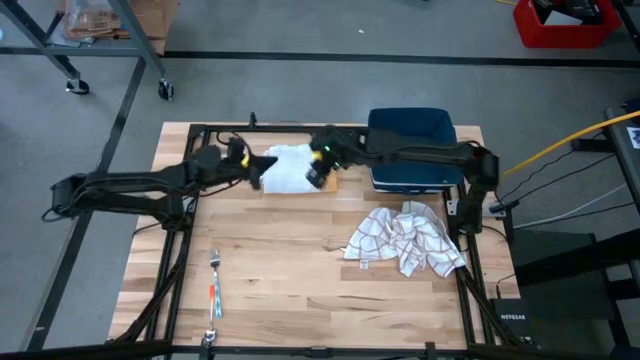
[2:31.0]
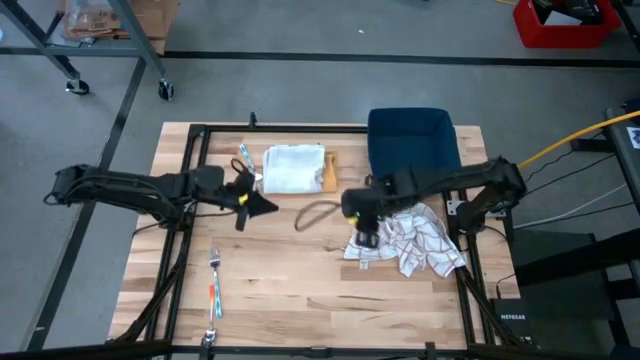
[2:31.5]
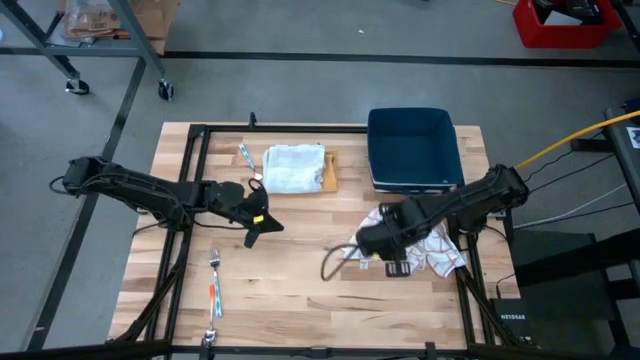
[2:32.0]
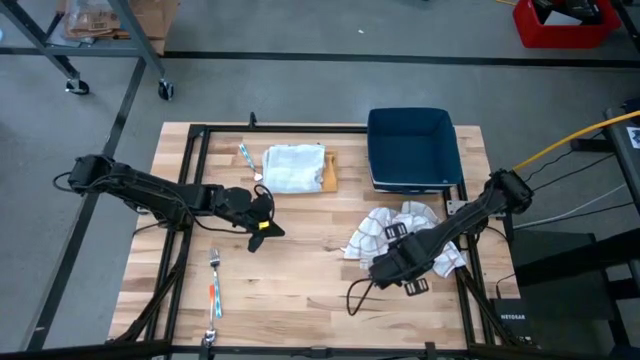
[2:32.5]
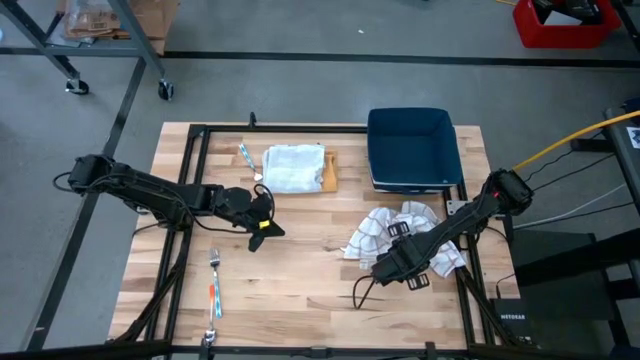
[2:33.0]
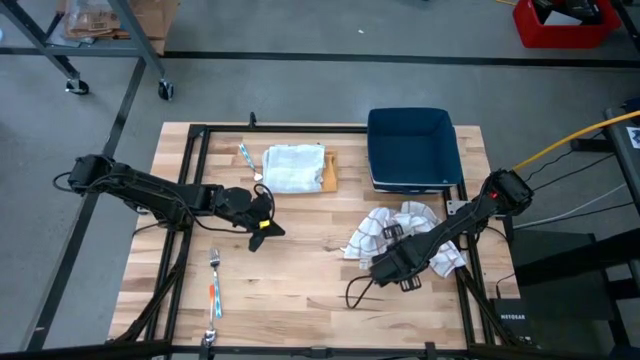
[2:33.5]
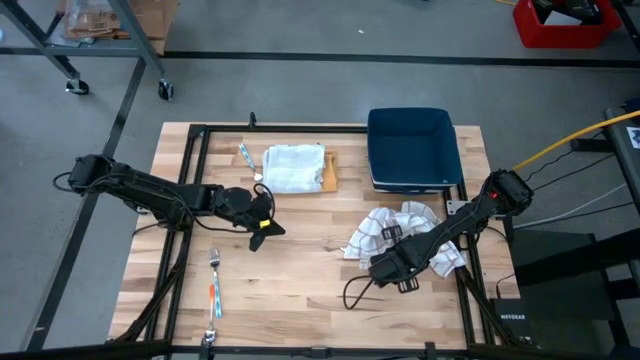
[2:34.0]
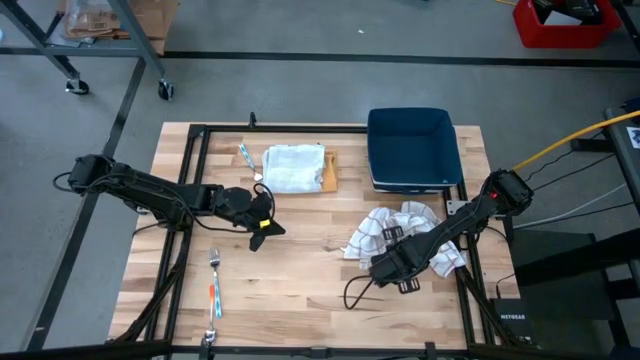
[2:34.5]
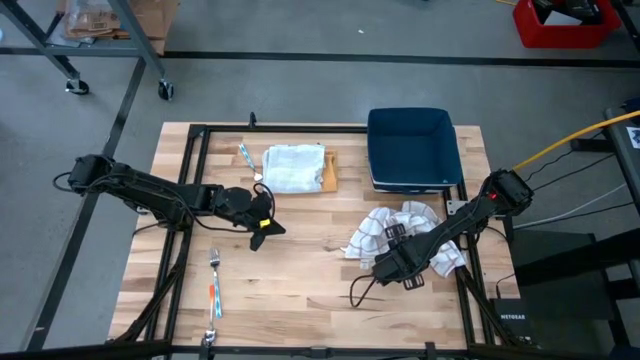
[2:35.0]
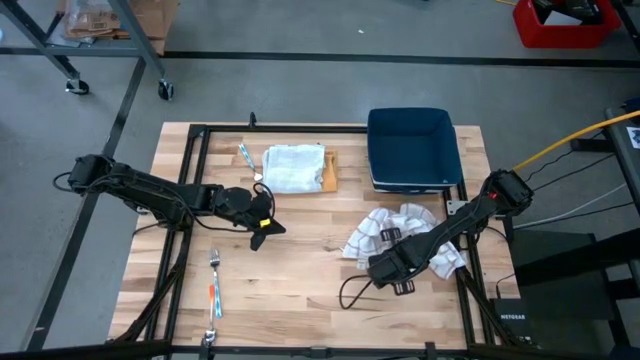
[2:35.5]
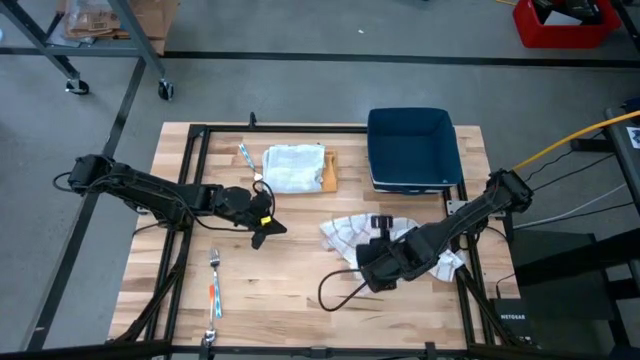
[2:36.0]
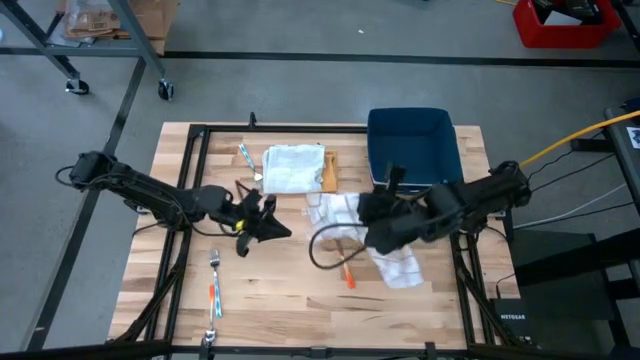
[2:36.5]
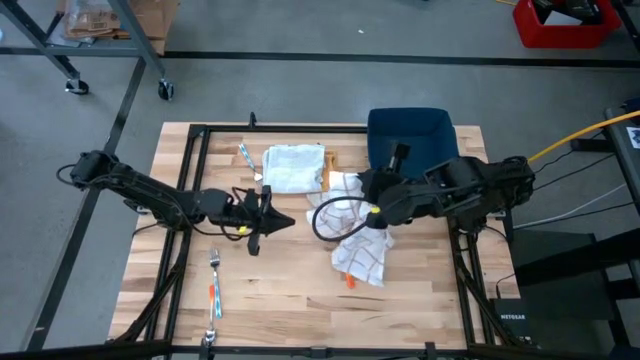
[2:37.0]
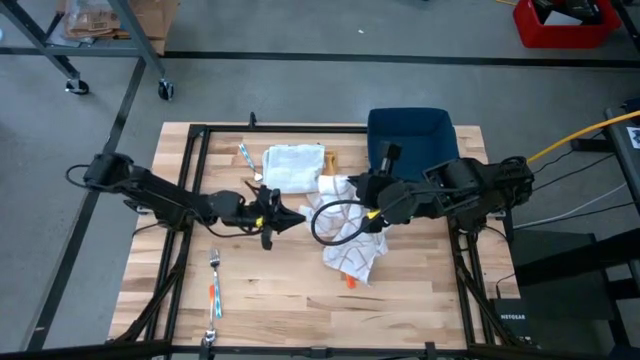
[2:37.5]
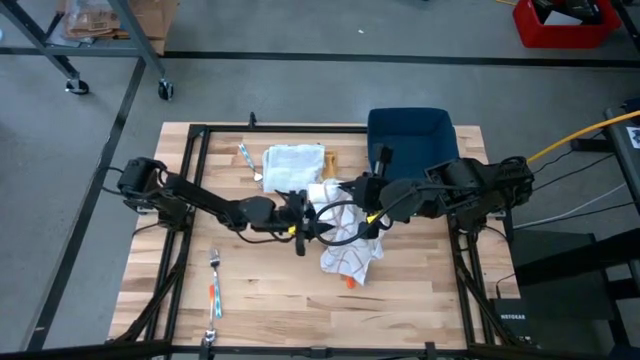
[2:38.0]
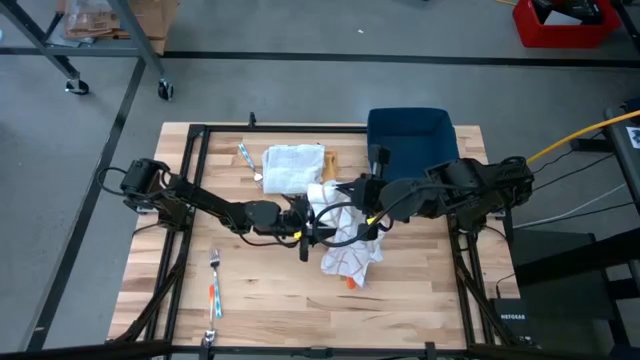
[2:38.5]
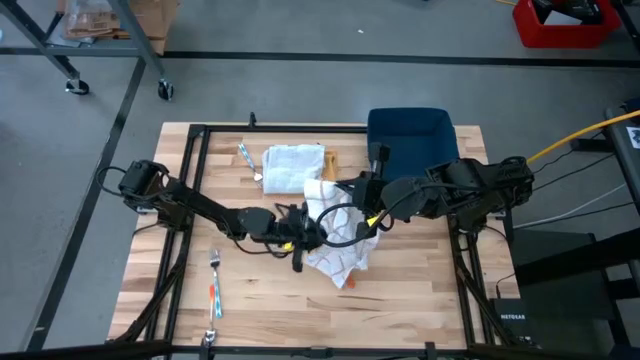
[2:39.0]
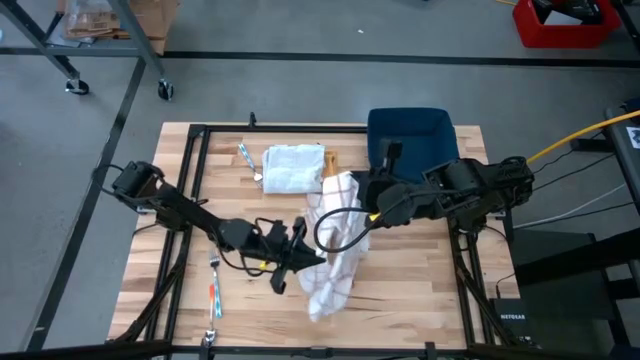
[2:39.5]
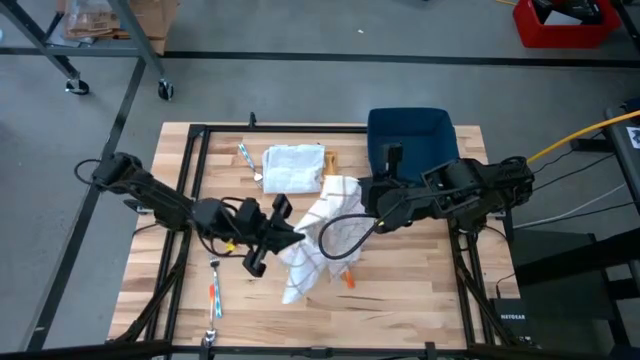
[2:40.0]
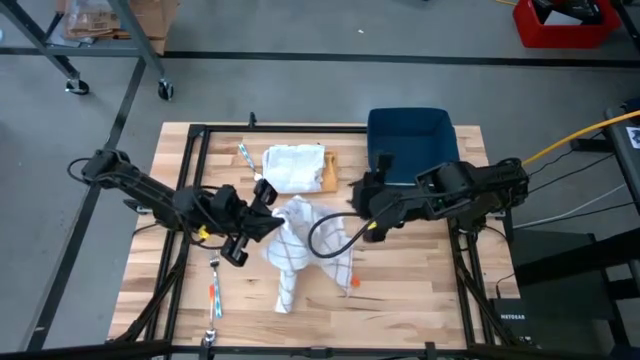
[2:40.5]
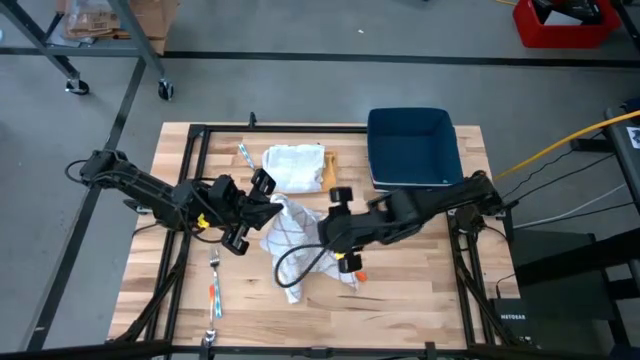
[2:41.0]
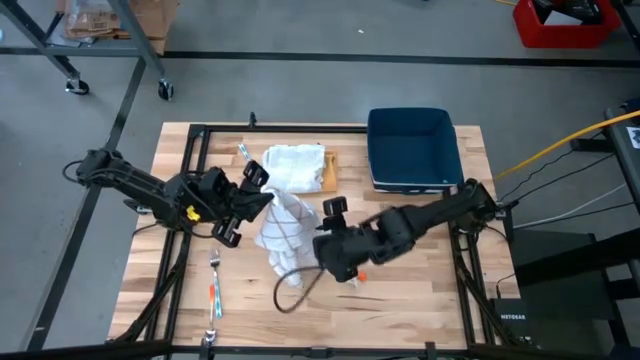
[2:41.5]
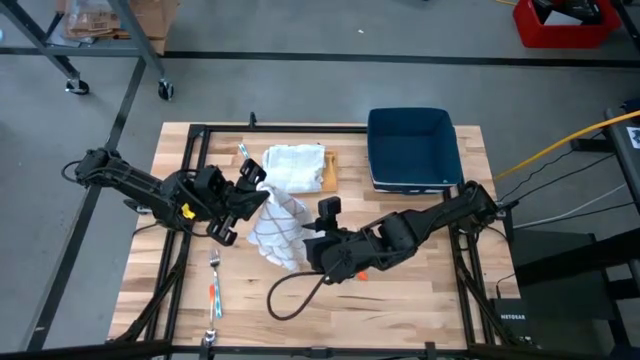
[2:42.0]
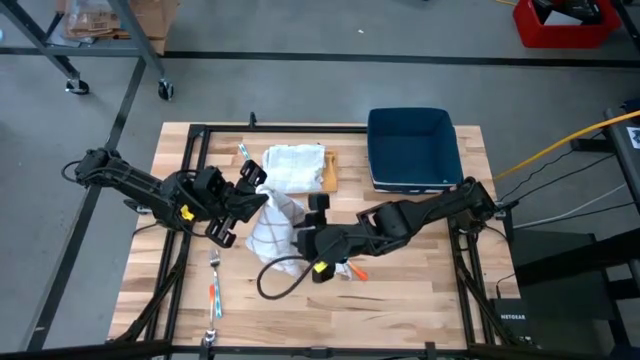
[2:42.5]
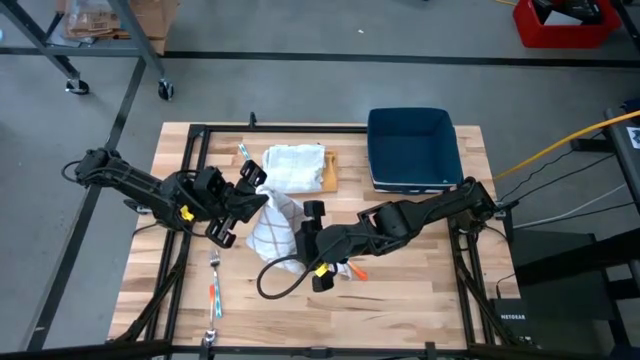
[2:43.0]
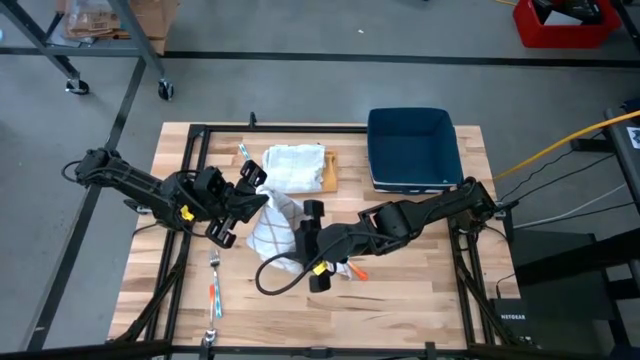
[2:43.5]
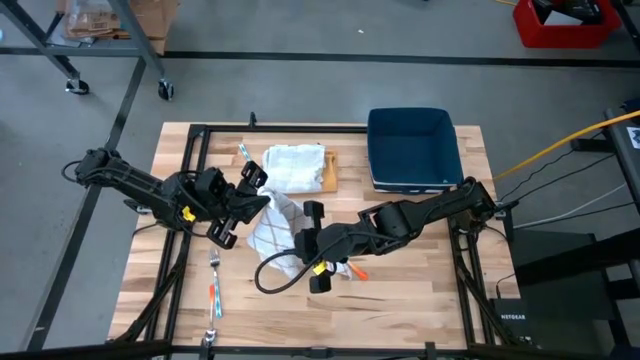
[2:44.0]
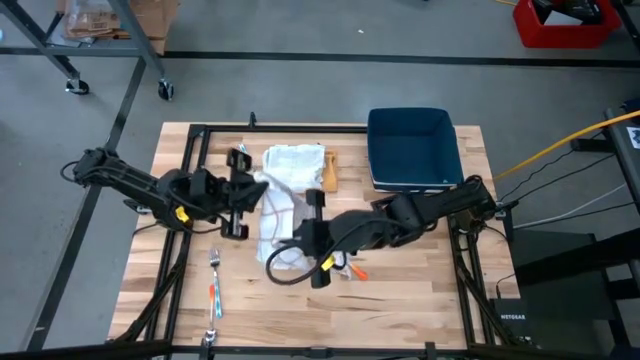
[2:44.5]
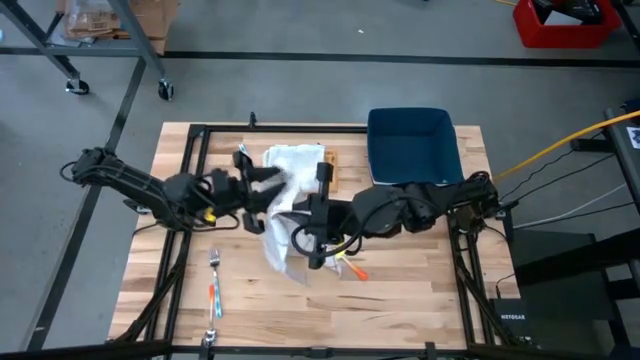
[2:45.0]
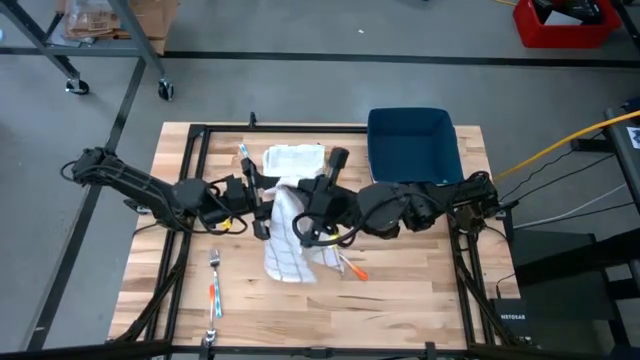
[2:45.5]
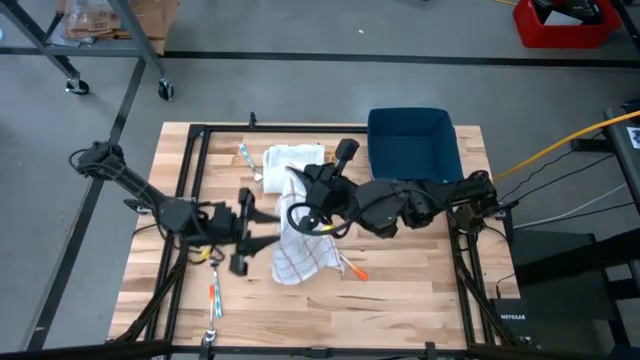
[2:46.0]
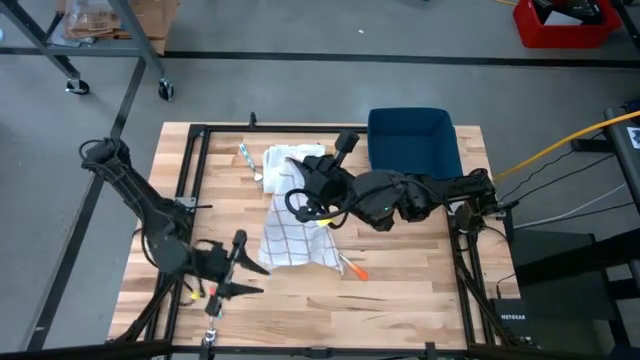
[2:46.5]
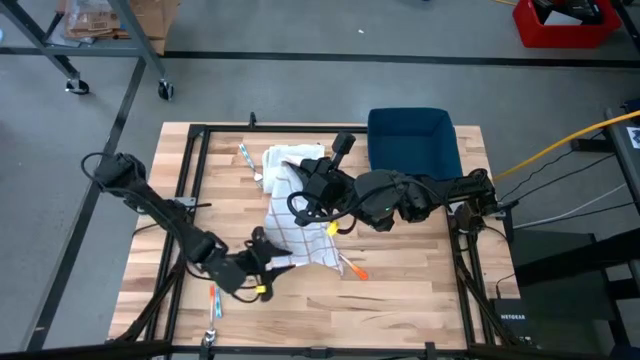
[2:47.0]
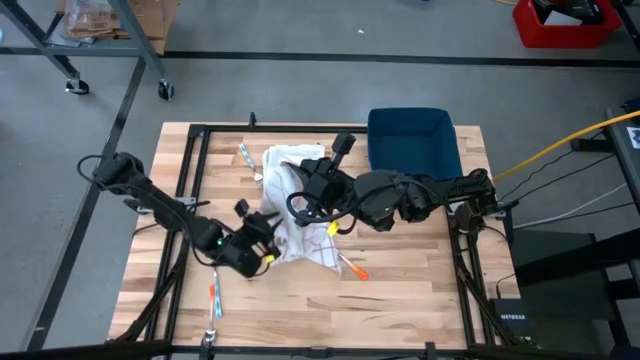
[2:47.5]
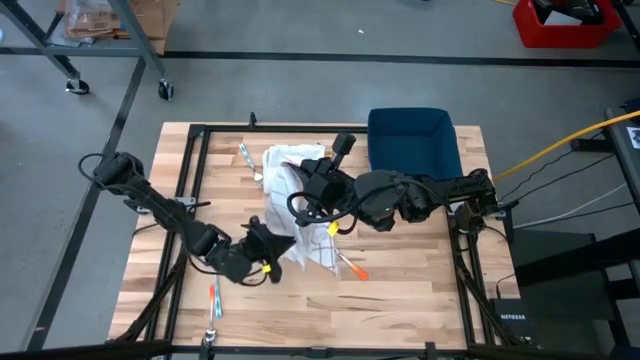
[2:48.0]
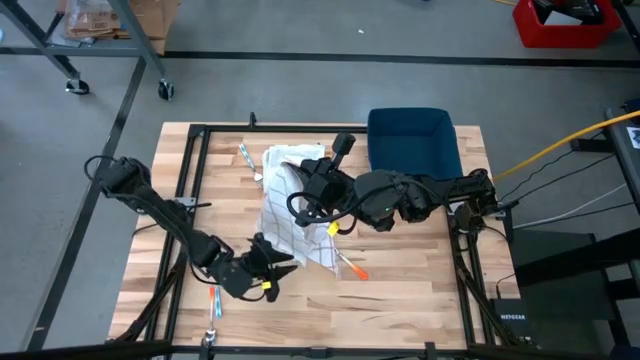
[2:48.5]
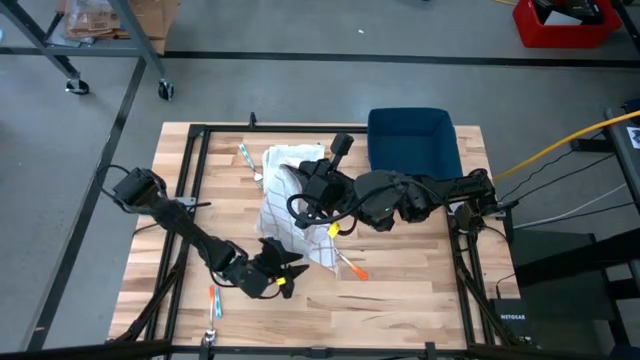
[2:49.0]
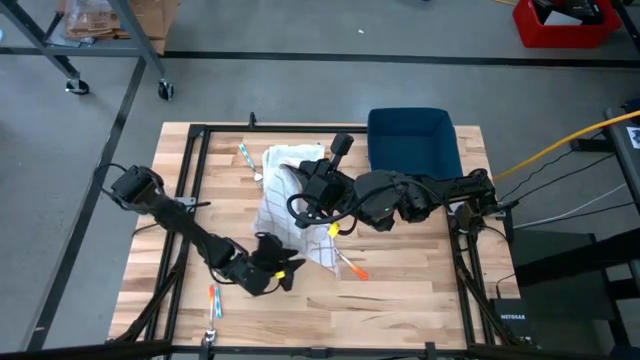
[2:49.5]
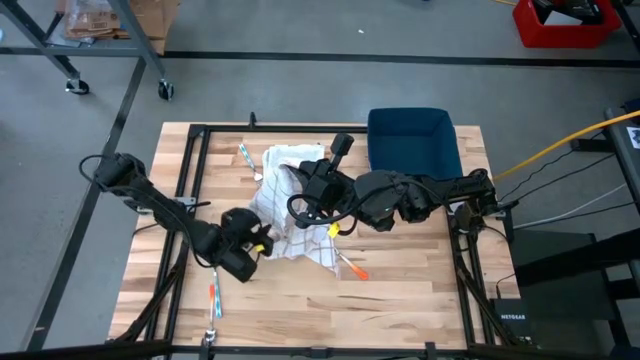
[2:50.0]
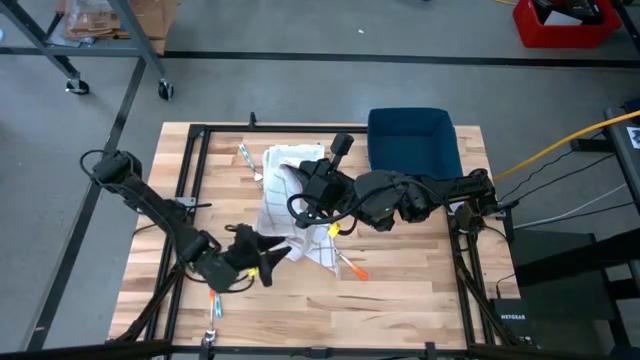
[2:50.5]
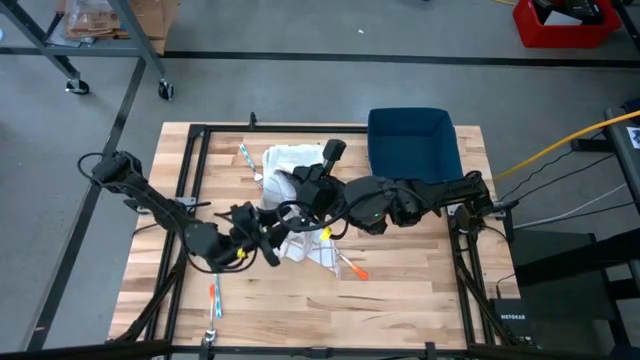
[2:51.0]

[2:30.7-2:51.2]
Task: Fold towel
Fold the white patterned towel
